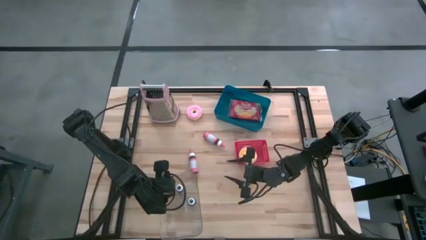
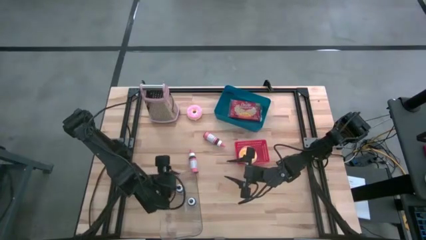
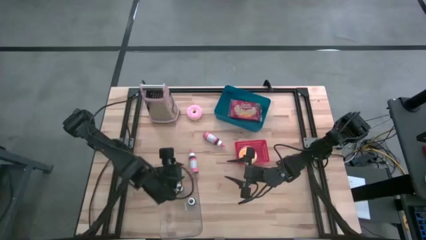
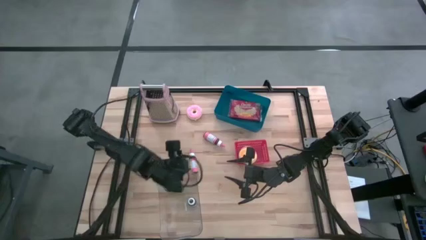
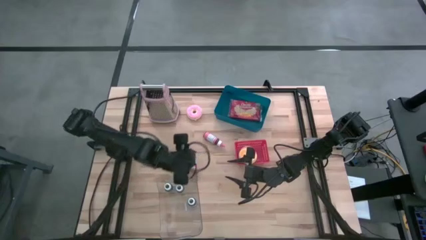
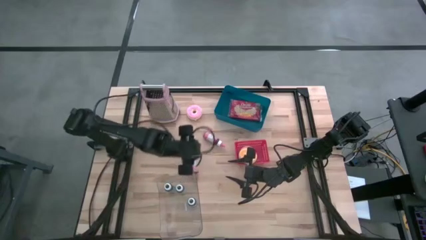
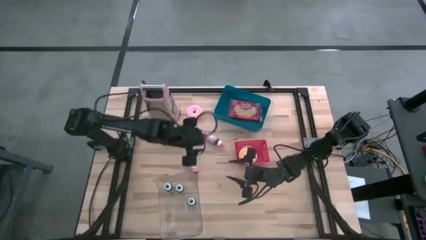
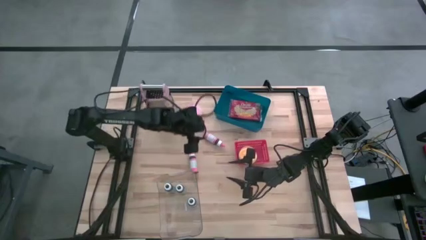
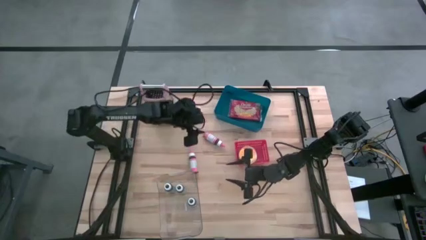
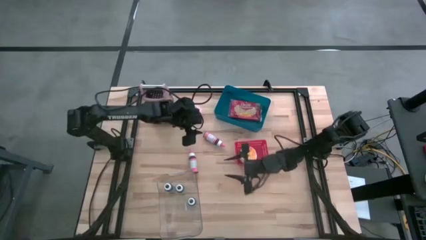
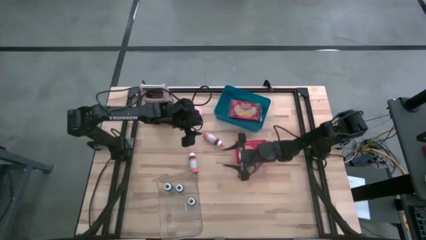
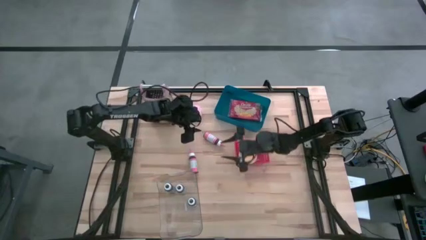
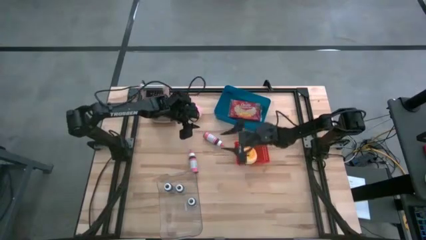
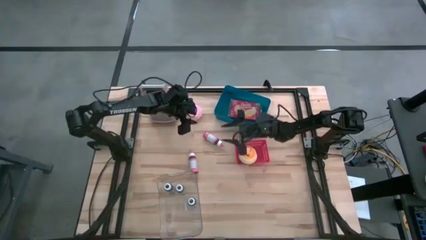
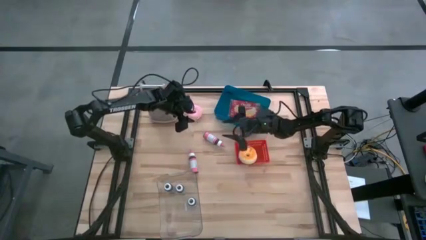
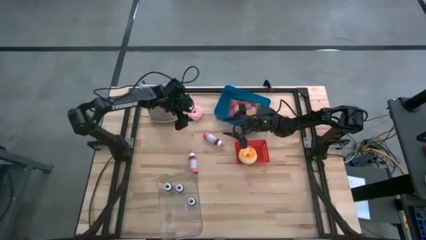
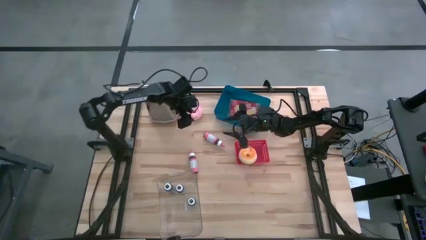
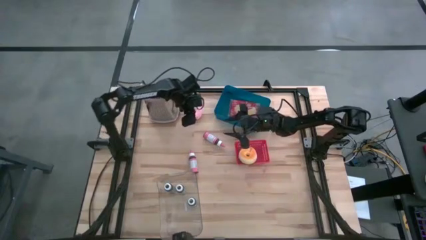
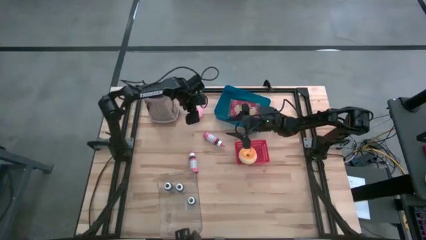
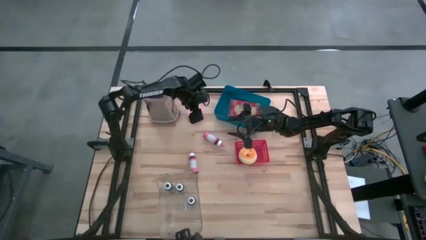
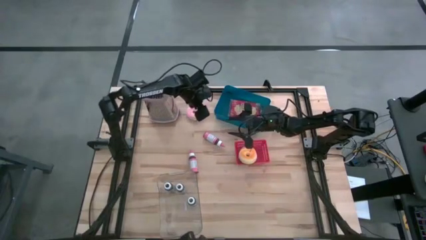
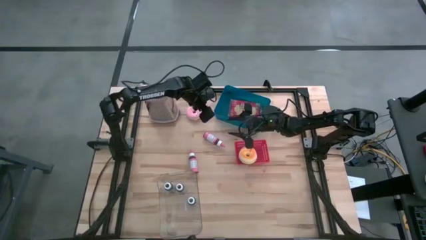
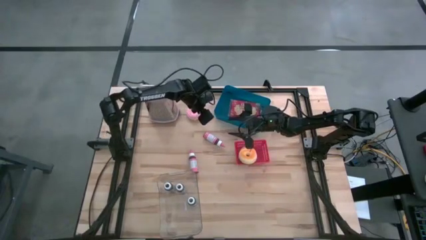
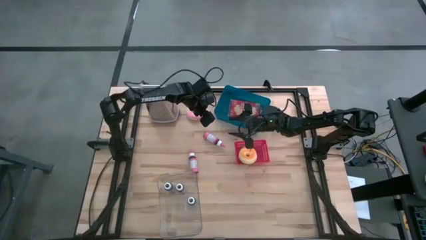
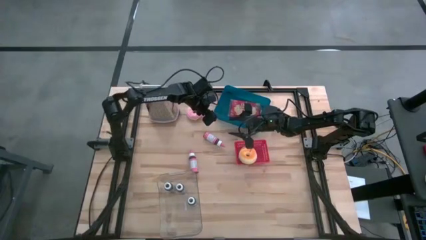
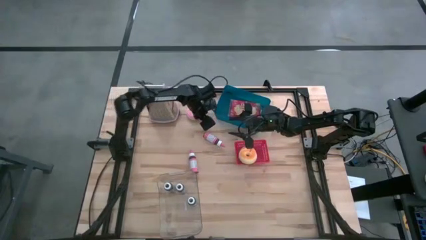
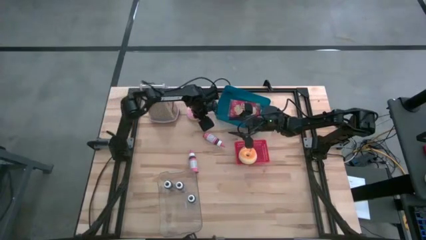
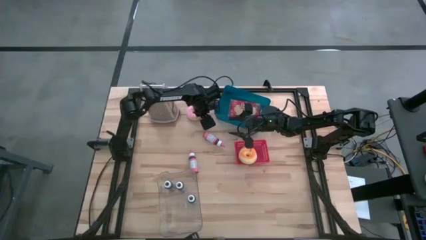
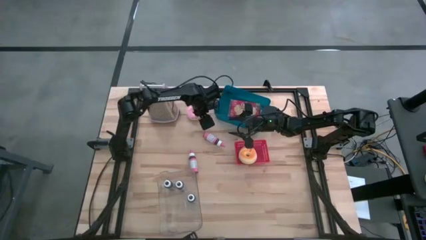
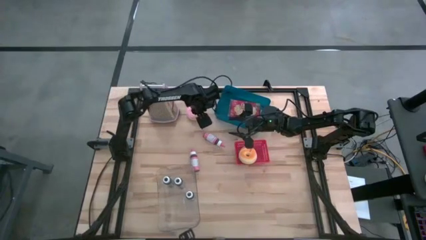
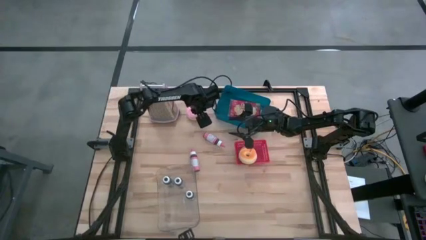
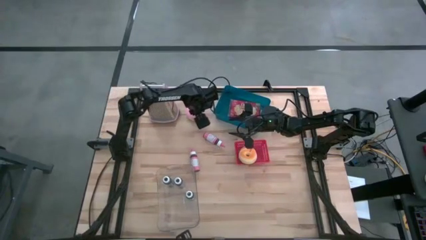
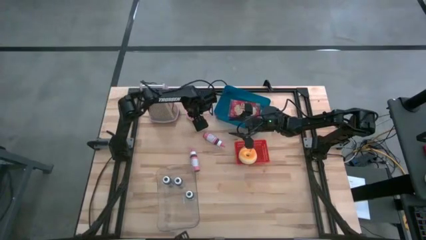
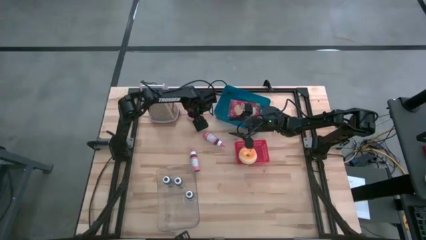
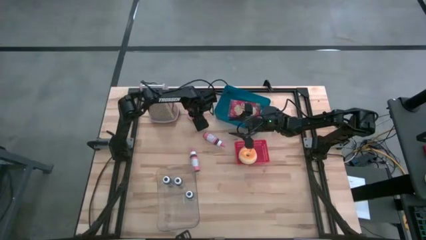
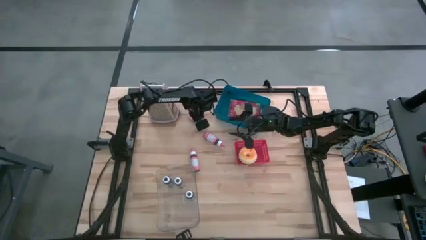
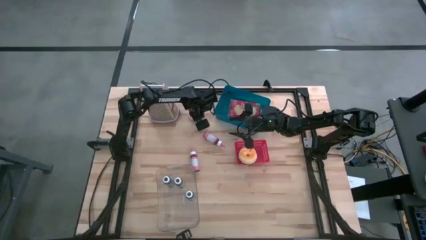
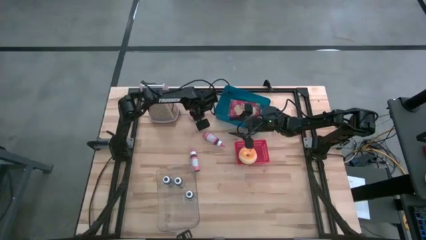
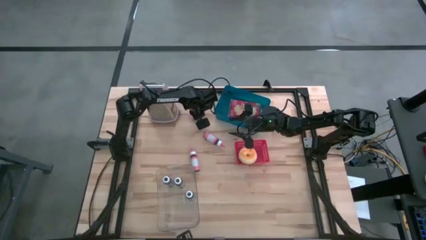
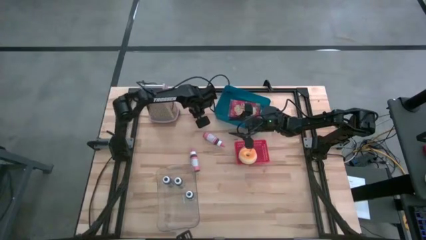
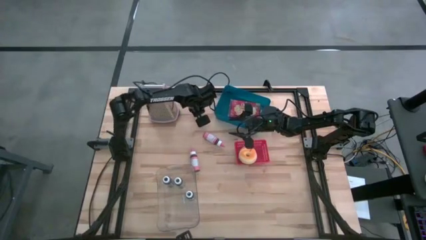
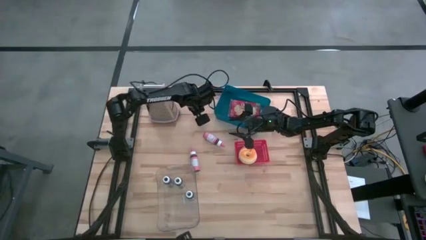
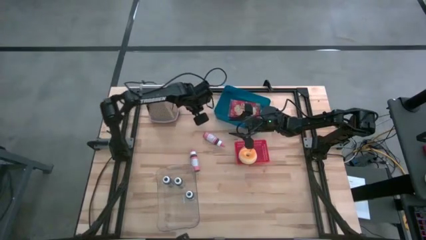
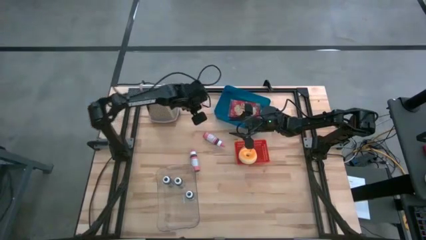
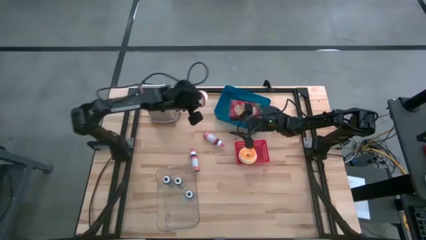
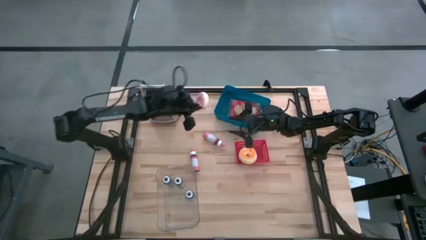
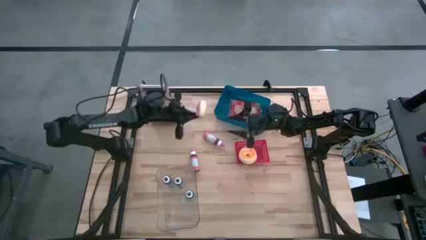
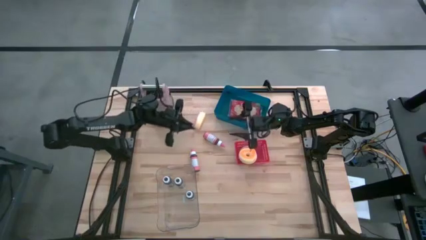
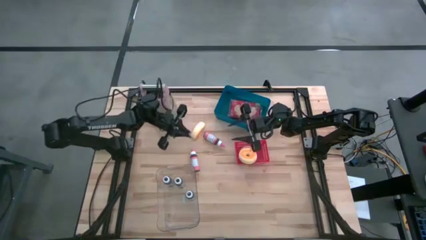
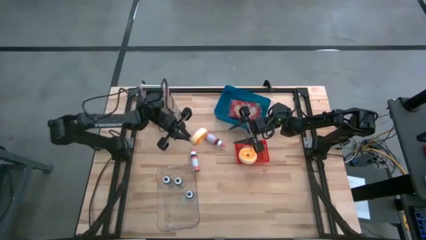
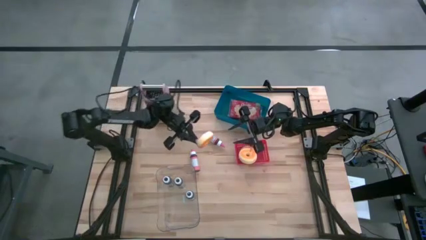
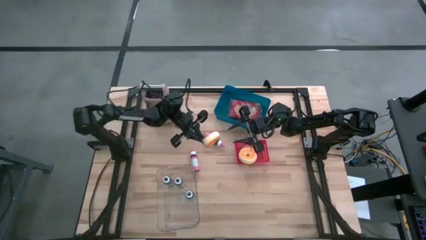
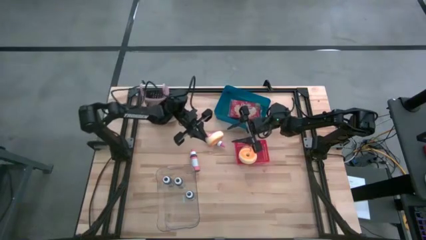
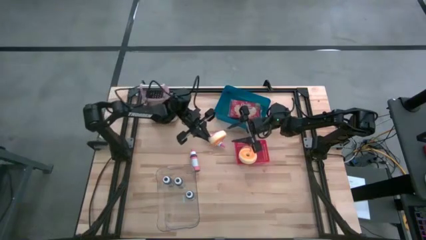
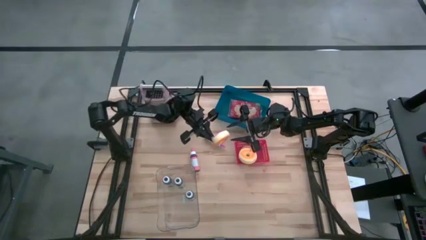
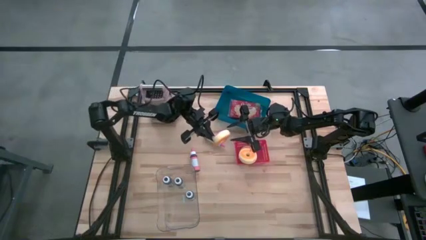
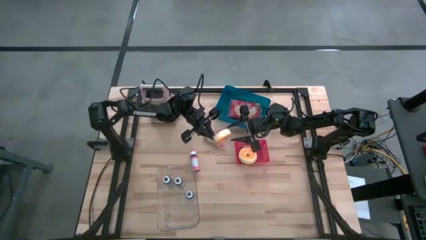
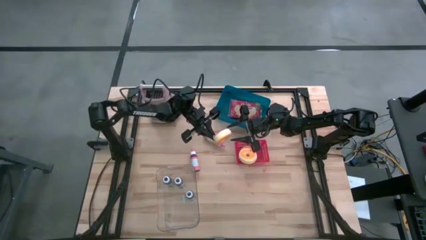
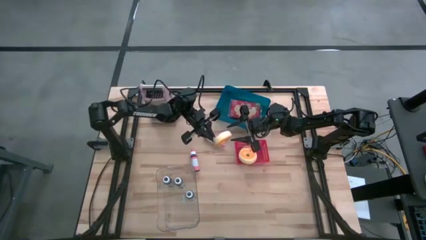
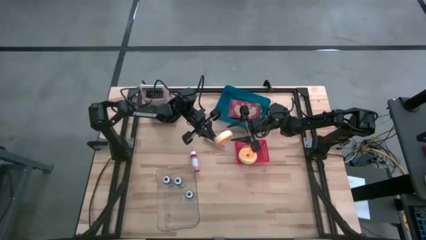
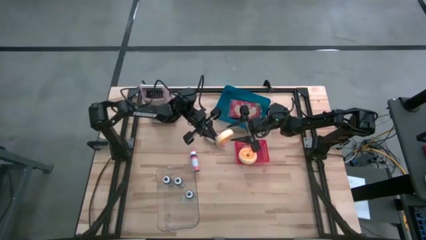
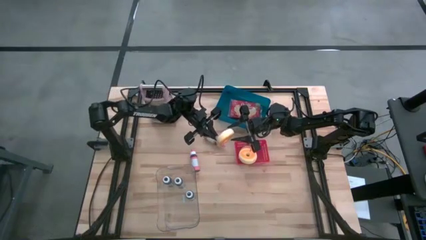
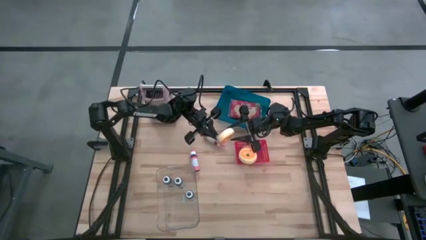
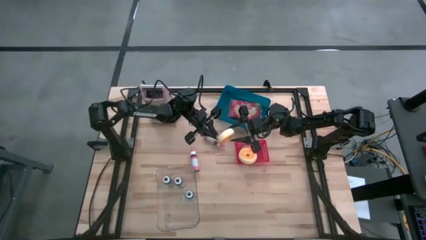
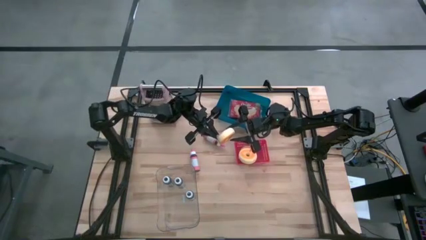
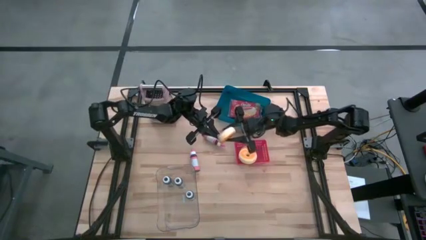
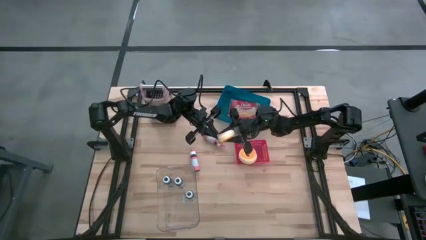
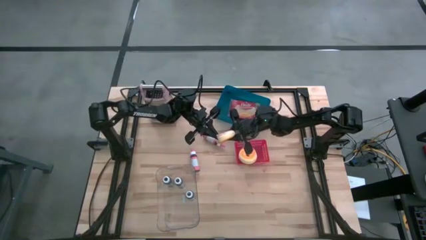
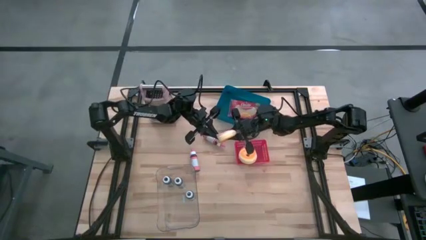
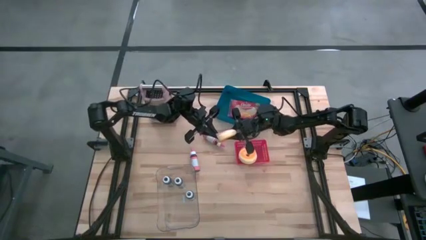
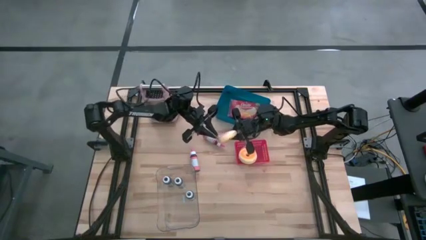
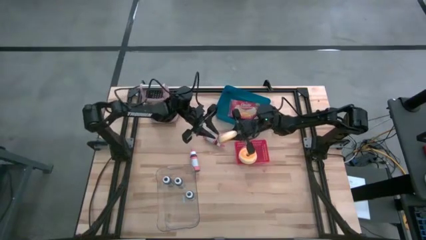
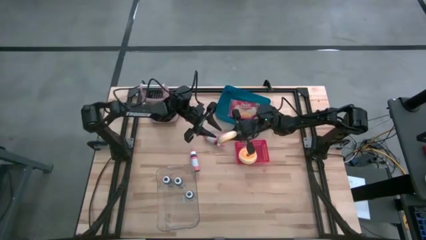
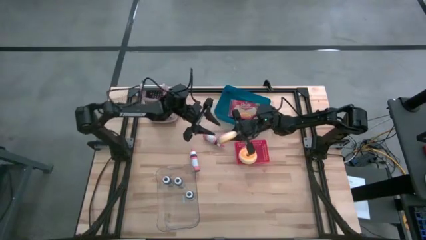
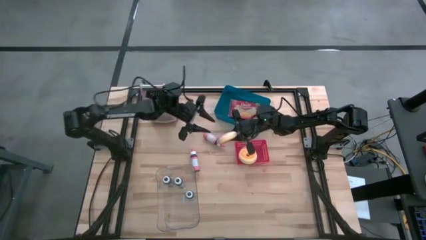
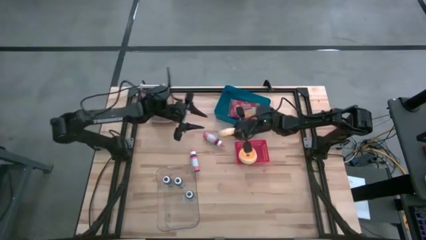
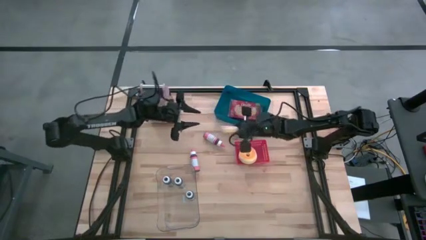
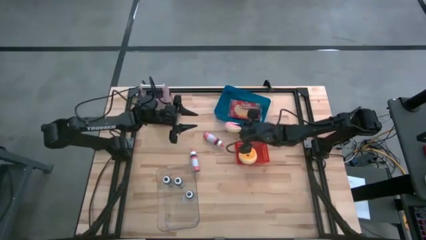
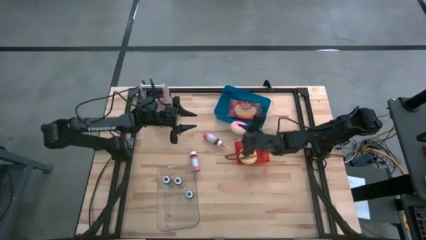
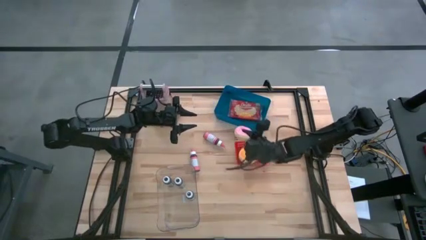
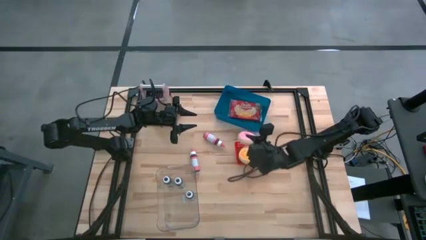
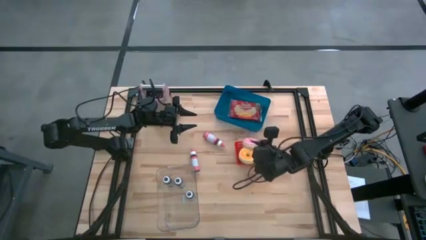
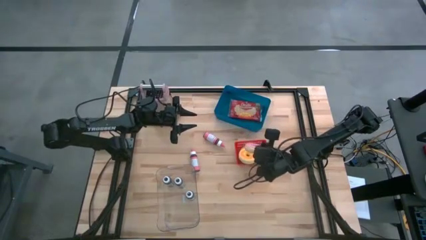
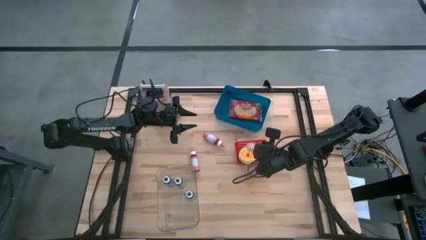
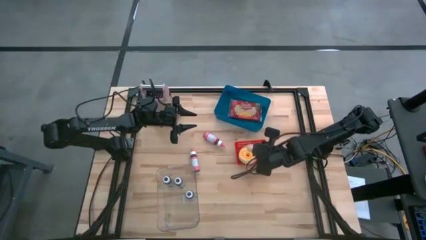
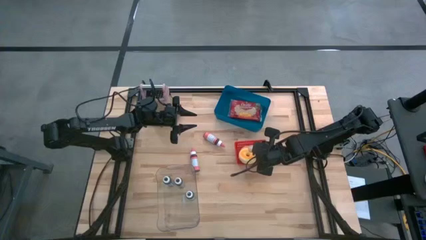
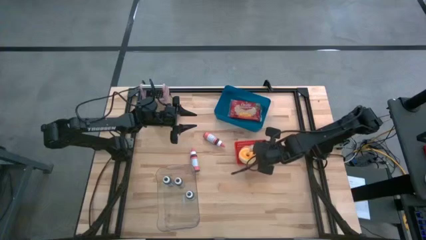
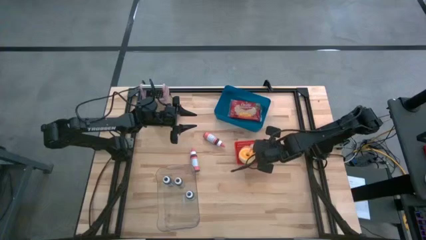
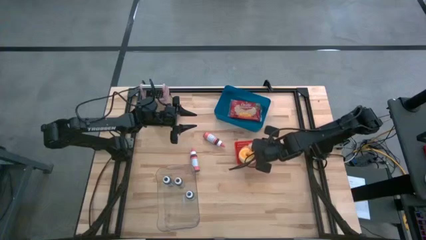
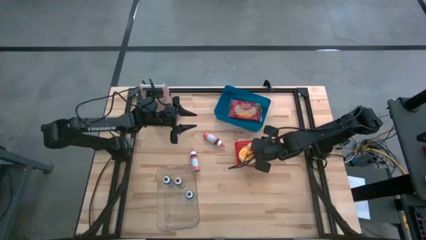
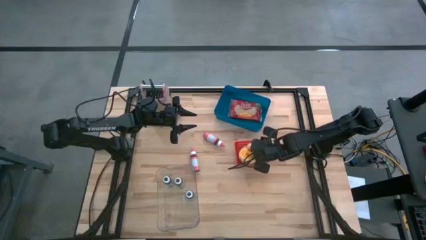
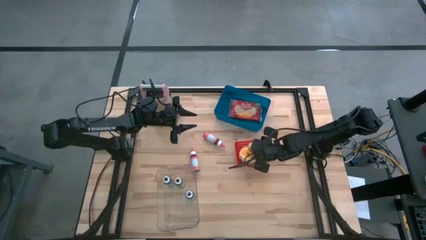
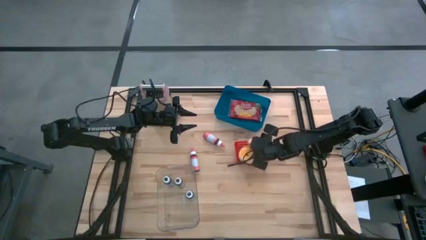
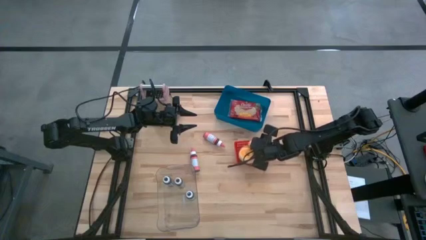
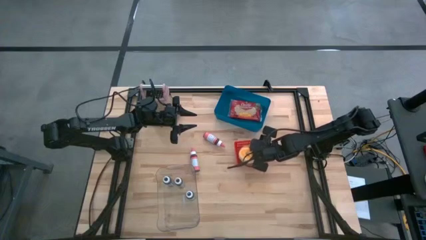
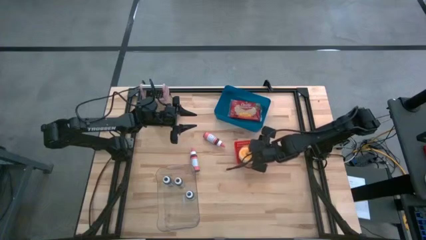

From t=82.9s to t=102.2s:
Task: Pick & Place Food Item
Put the pink donut into the red basket
